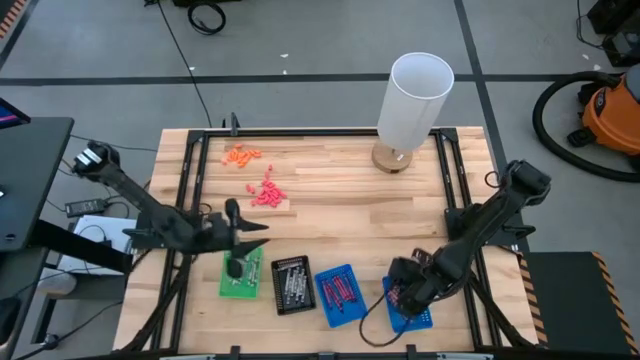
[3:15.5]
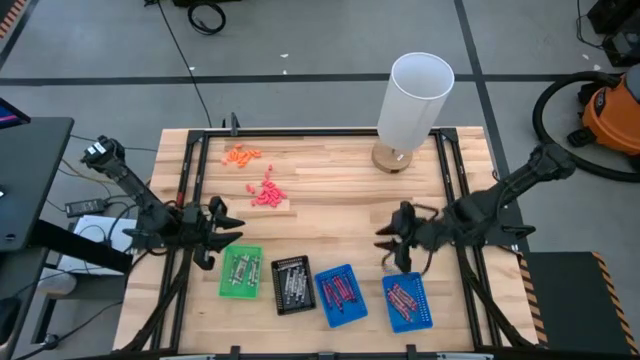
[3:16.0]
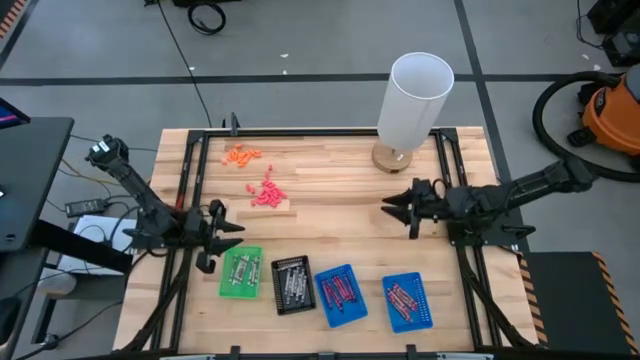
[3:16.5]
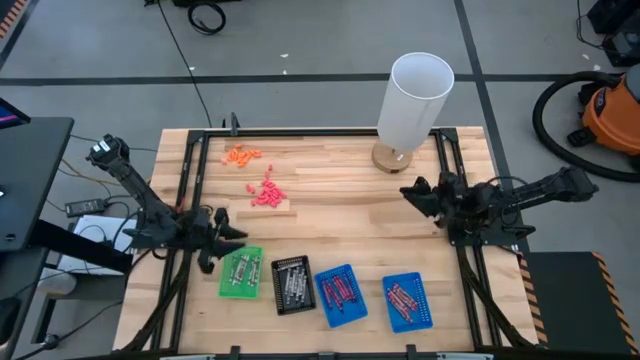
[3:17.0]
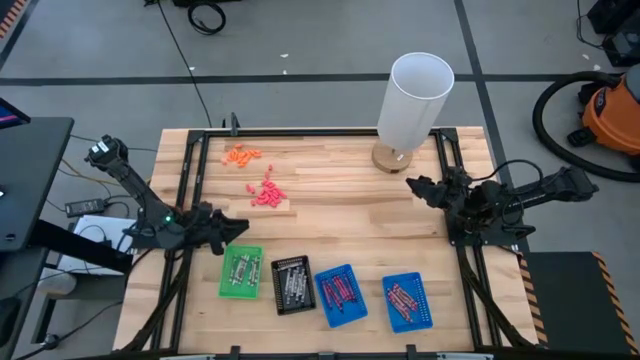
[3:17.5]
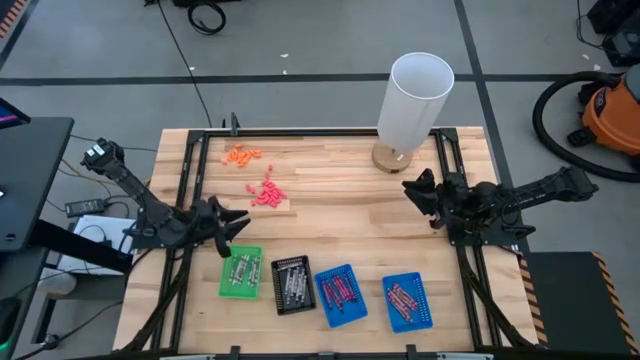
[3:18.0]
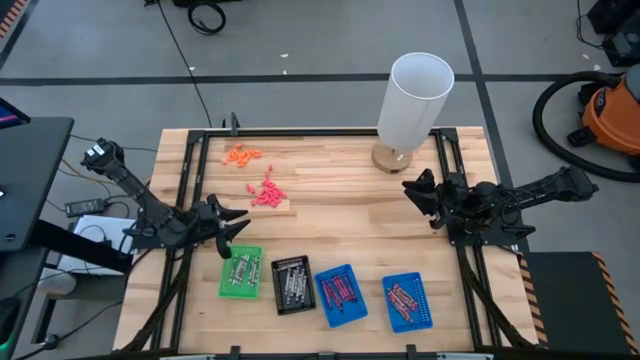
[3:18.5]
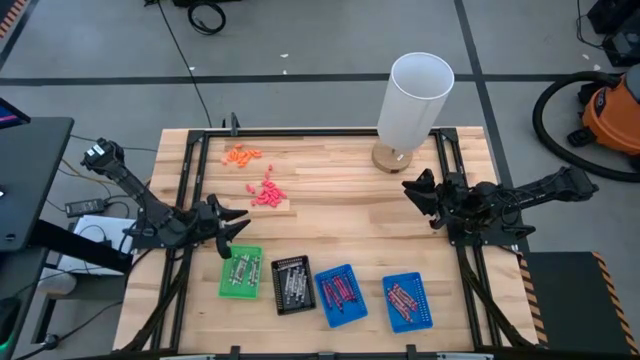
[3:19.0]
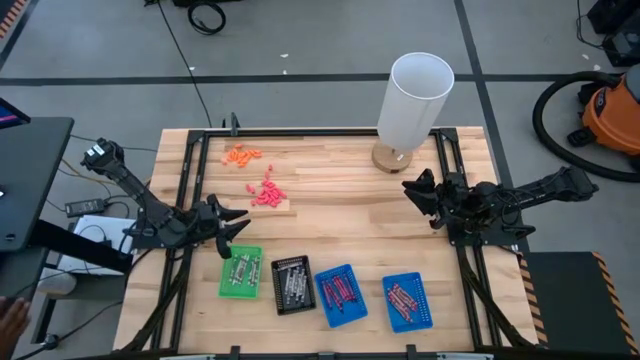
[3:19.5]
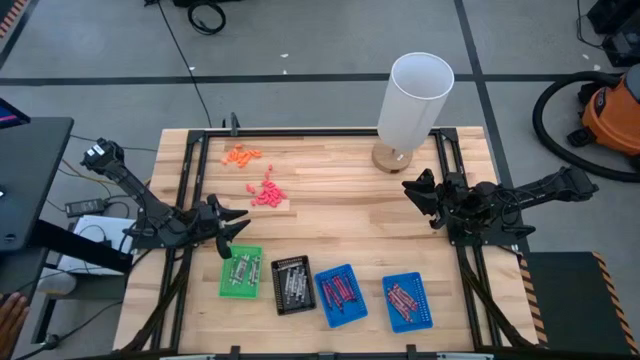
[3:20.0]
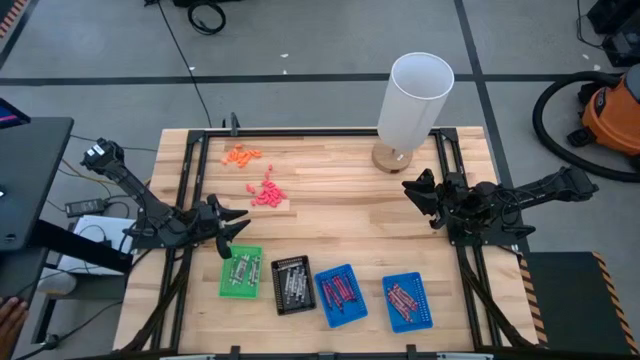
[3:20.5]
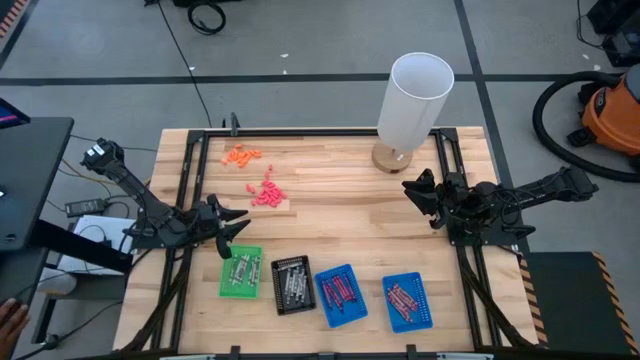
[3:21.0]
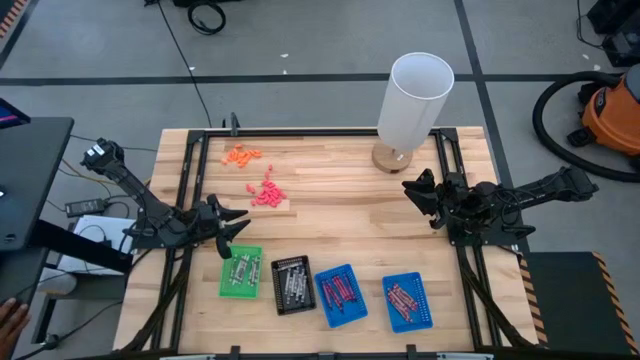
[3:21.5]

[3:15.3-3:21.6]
Task: Sort crayons
Return to Home Position

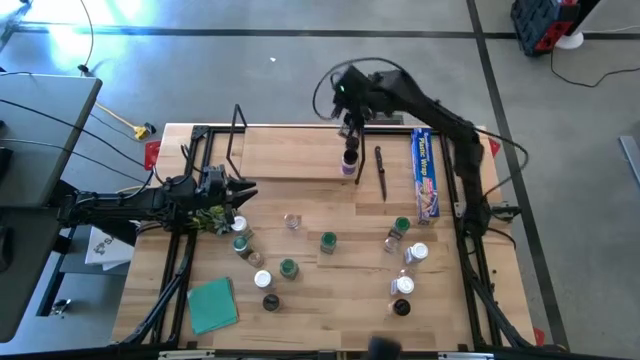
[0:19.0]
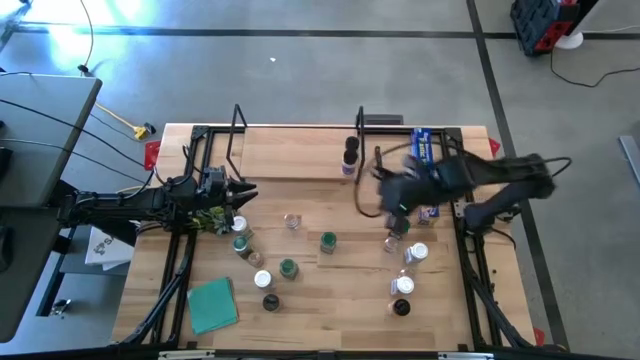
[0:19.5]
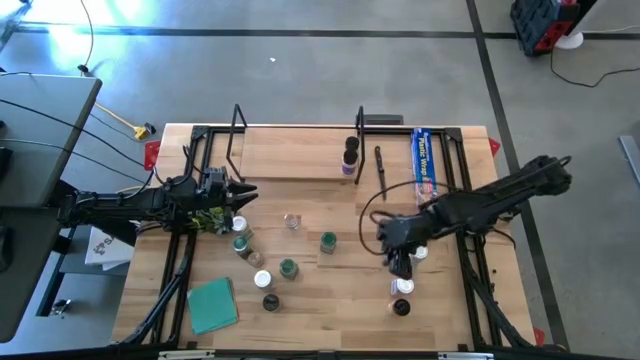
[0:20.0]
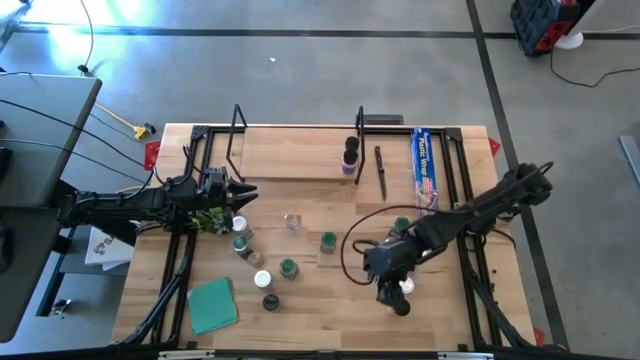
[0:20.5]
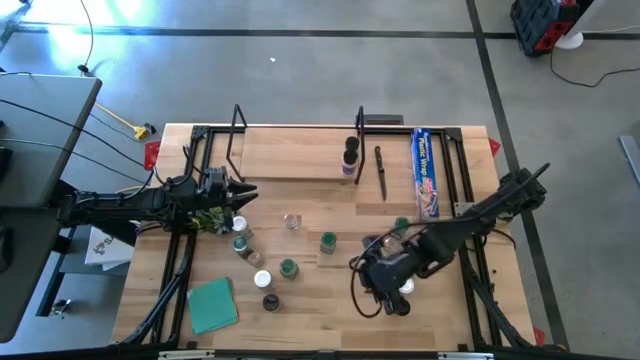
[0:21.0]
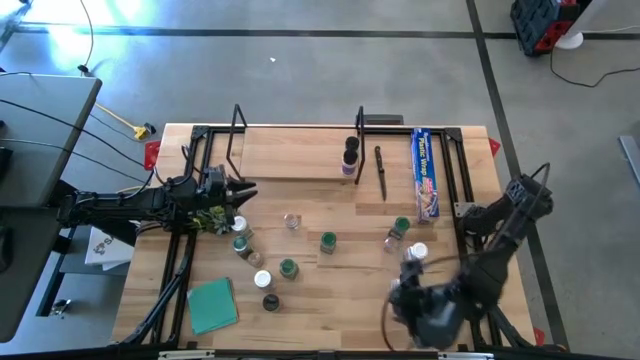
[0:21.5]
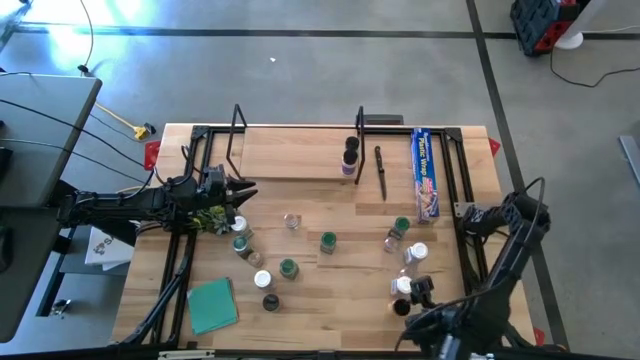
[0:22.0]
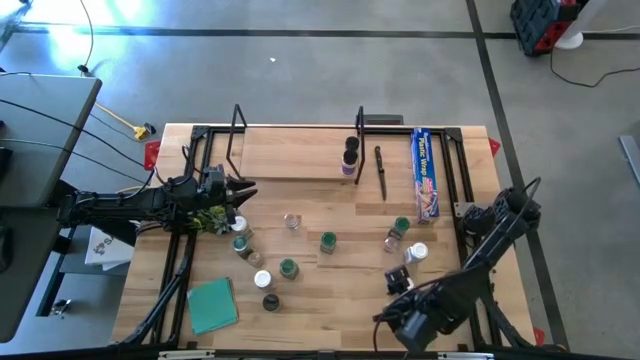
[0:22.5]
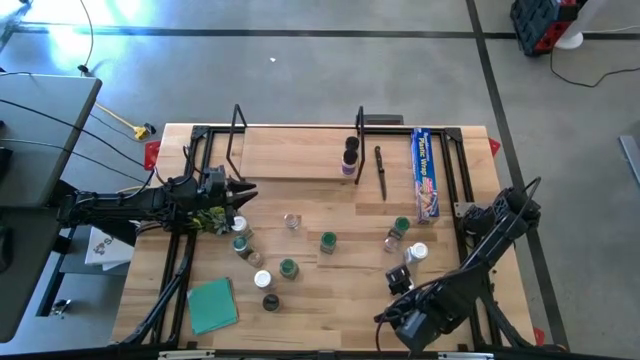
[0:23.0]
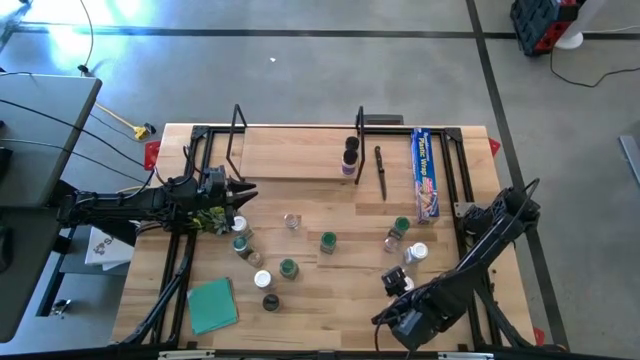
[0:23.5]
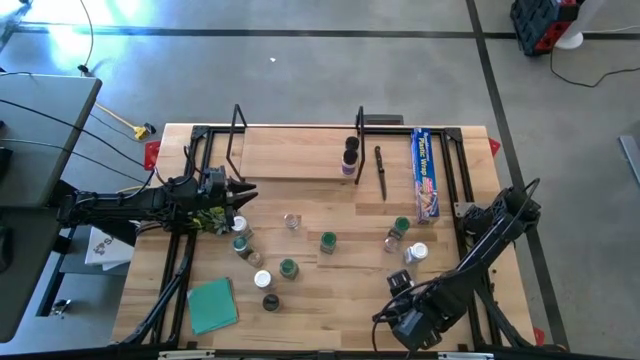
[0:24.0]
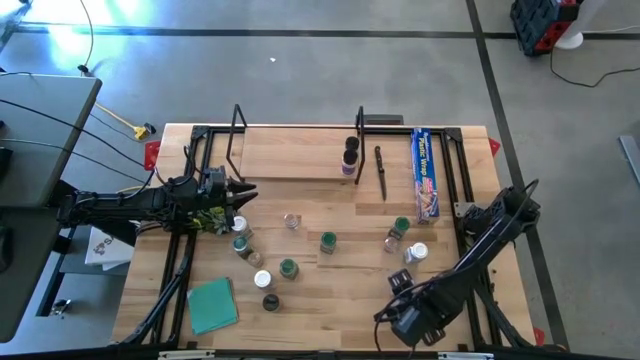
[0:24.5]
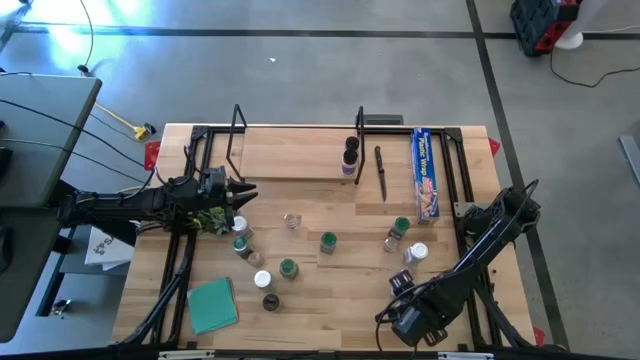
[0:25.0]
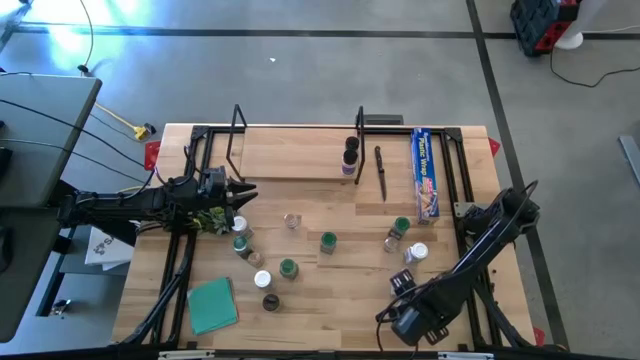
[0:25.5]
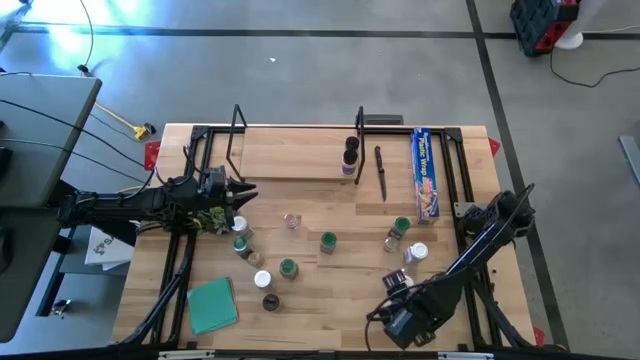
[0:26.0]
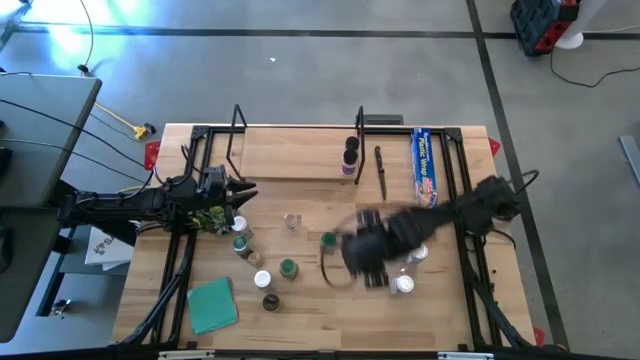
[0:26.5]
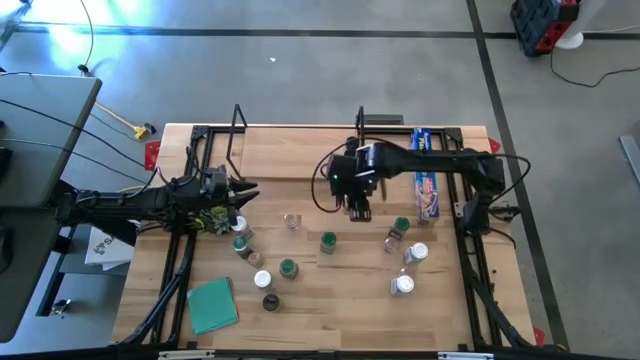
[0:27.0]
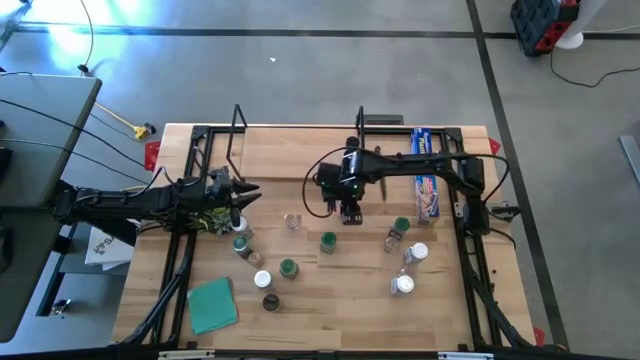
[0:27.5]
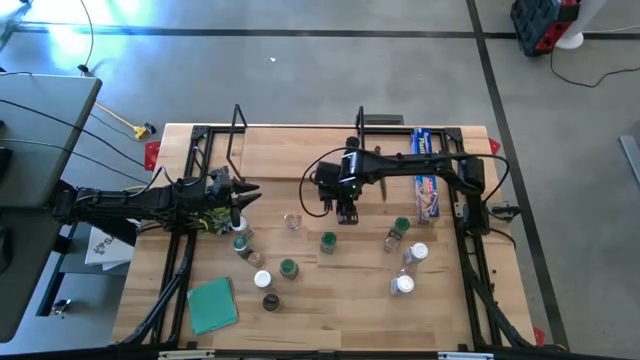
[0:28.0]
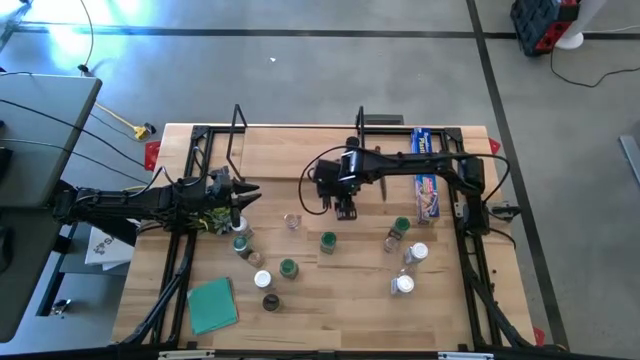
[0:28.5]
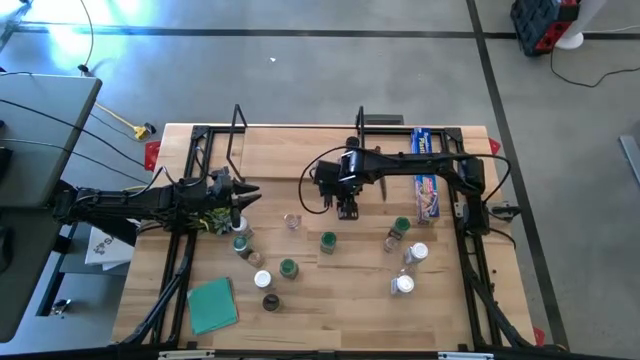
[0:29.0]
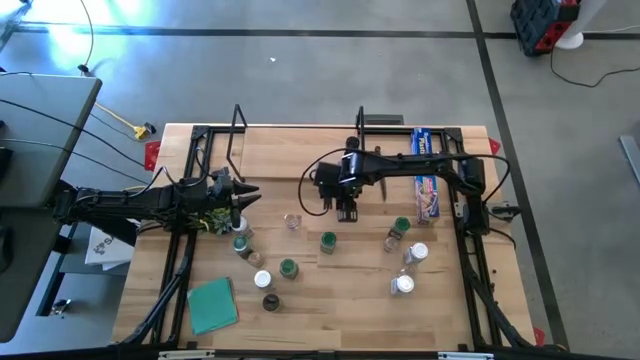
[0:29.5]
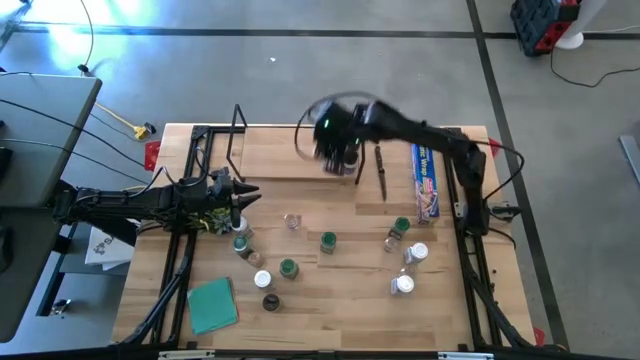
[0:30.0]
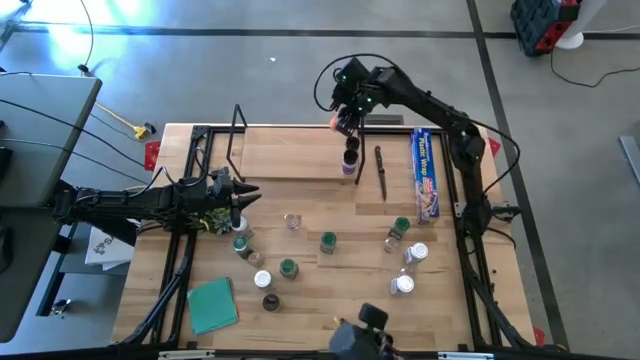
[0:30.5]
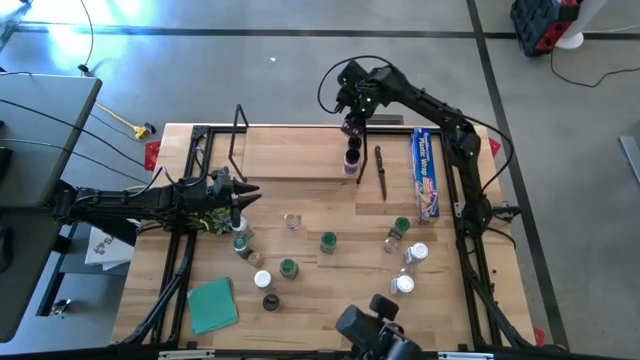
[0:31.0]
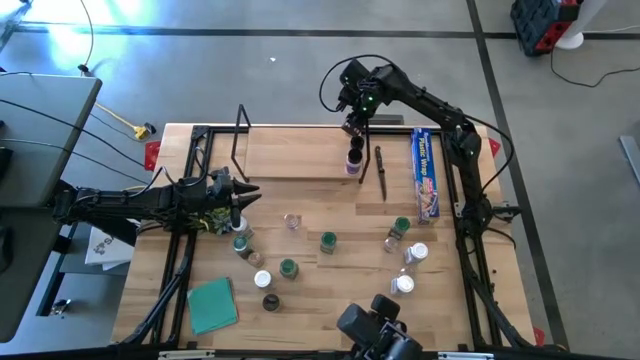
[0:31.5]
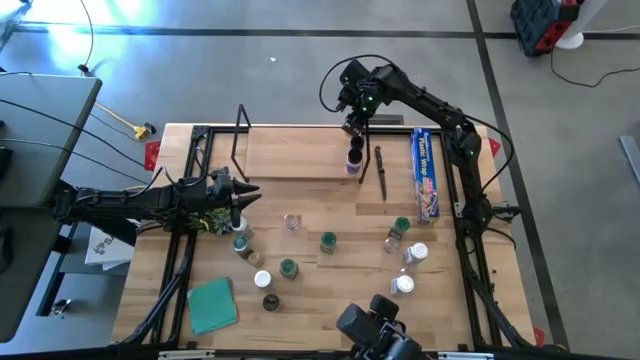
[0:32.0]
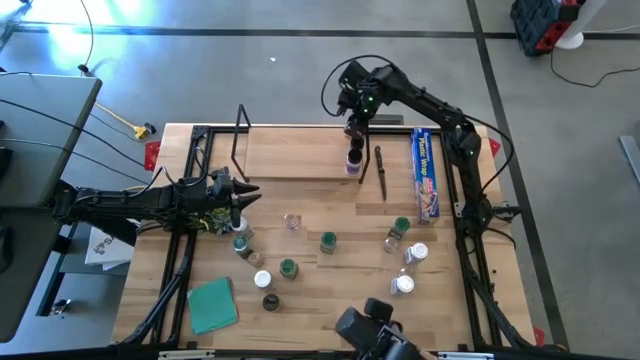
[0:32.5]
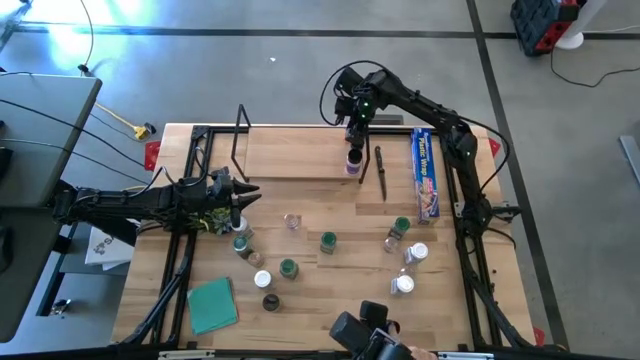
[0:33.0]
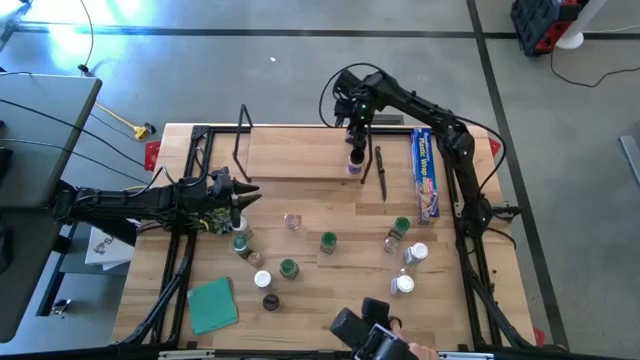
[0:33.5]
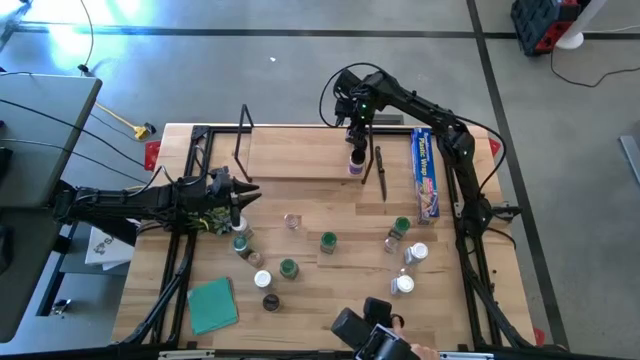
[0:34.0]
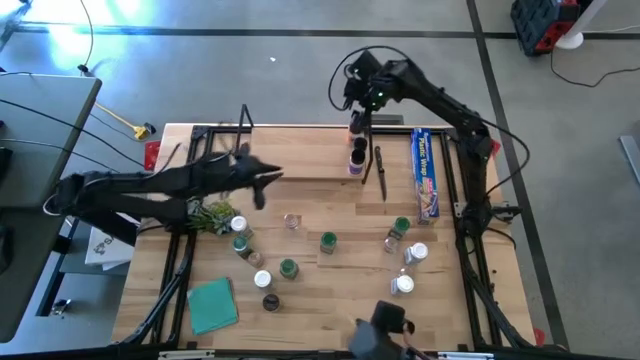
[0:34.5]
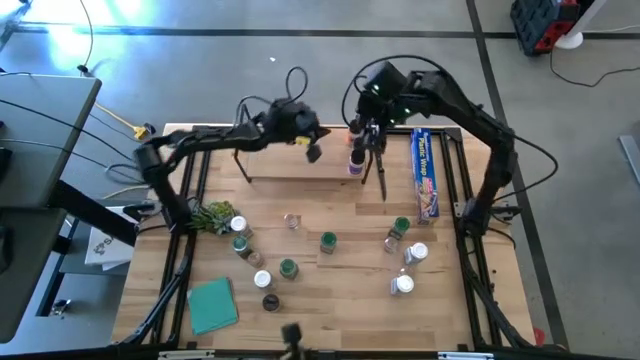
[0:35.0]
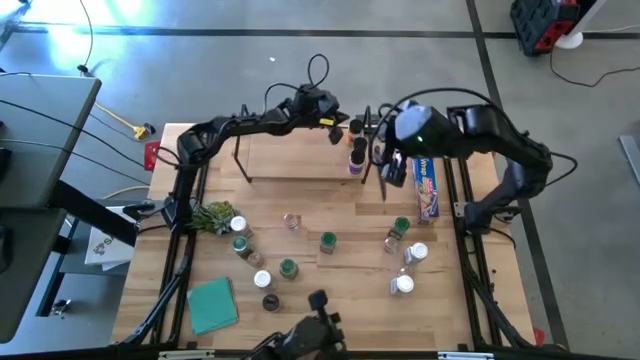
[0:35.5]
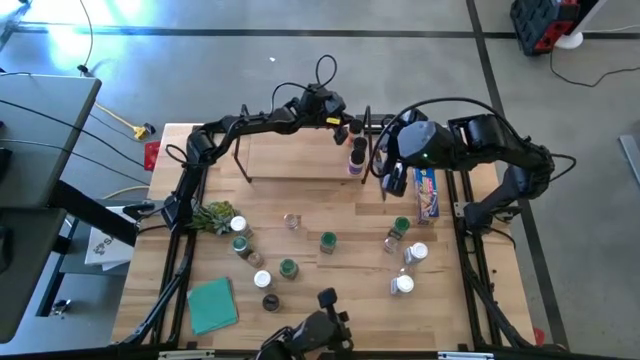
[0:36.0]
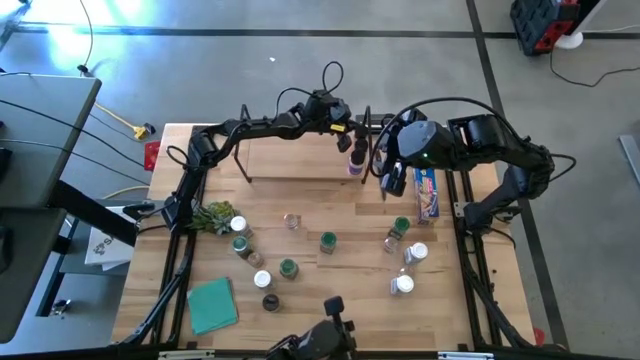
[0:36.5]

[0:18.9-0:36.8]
Task: Shelf spices
Put the black seasoning bottle on the shelf aligned with the other black seasoning bottles
